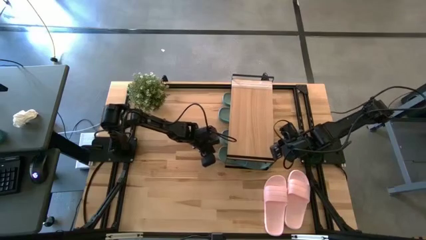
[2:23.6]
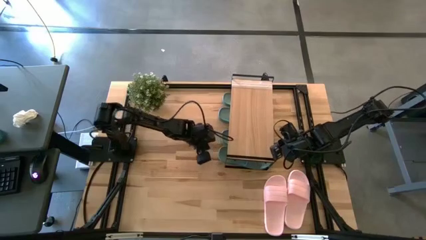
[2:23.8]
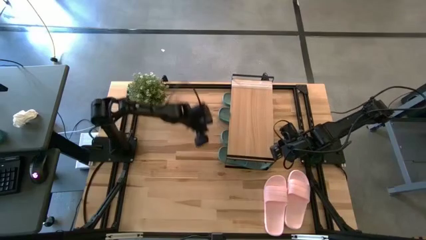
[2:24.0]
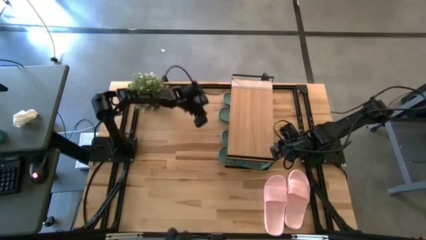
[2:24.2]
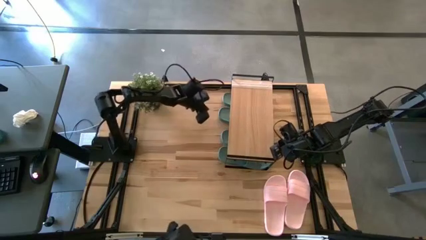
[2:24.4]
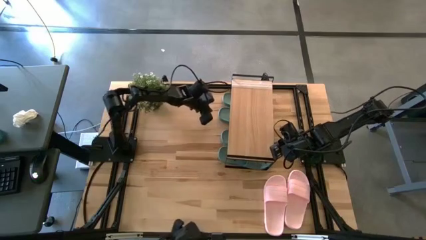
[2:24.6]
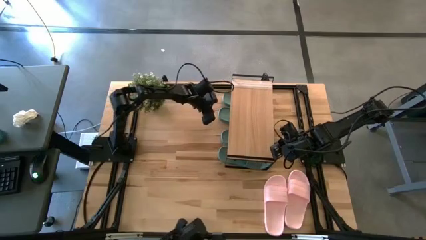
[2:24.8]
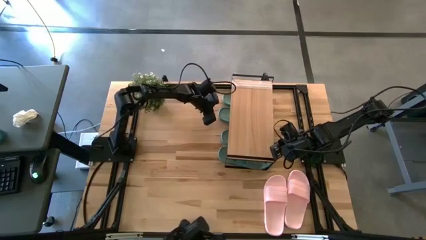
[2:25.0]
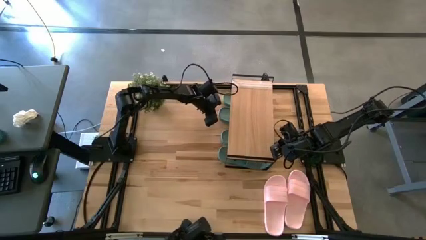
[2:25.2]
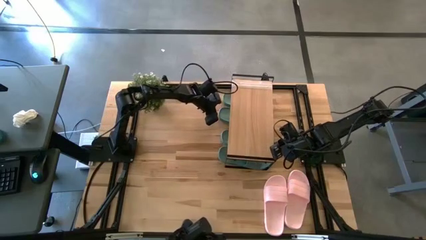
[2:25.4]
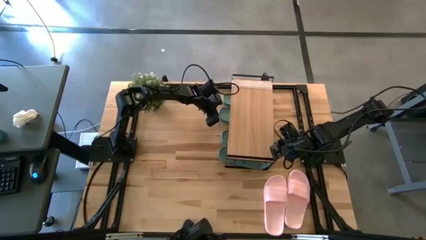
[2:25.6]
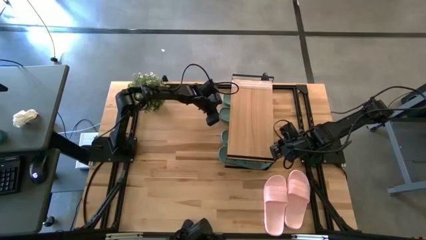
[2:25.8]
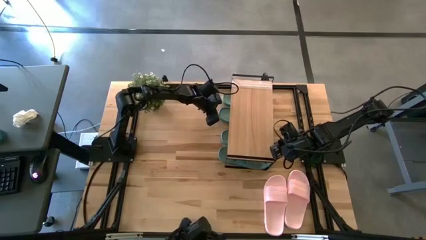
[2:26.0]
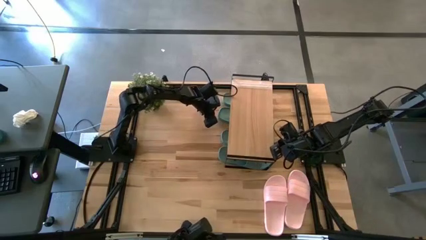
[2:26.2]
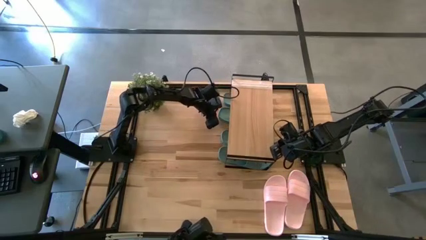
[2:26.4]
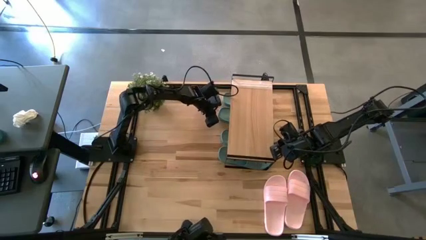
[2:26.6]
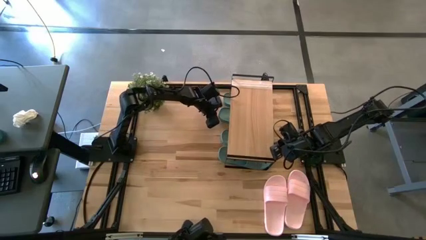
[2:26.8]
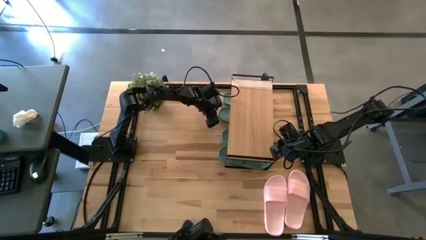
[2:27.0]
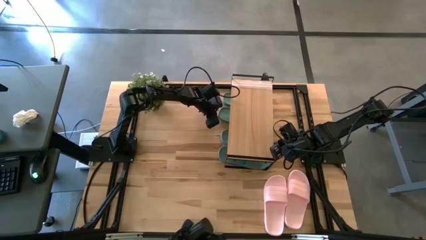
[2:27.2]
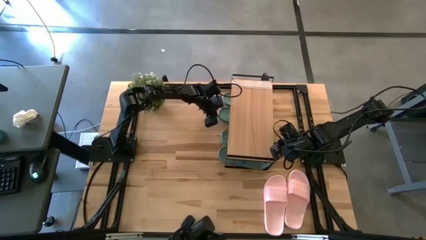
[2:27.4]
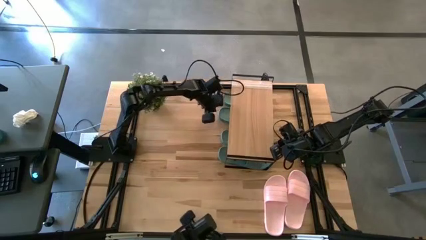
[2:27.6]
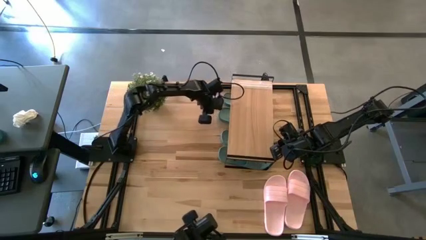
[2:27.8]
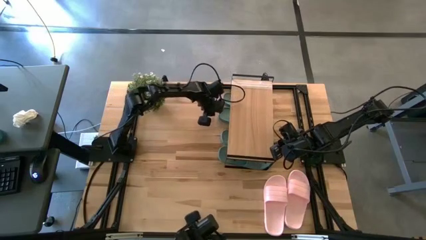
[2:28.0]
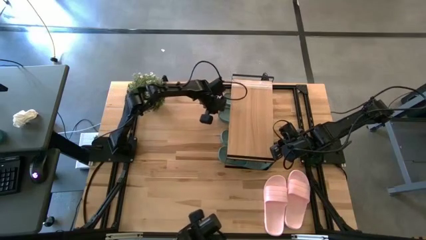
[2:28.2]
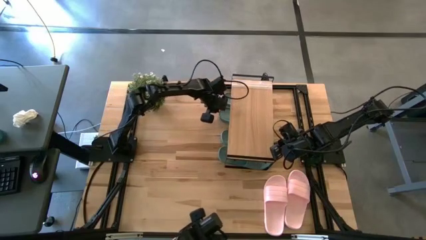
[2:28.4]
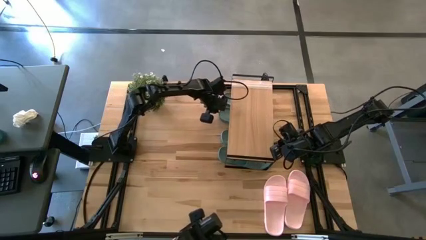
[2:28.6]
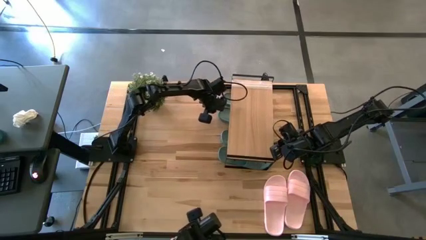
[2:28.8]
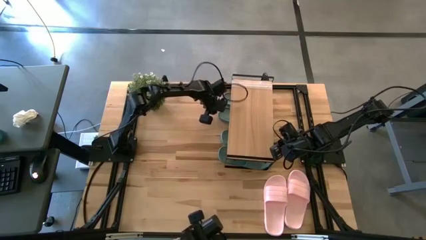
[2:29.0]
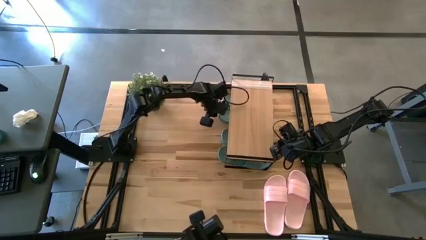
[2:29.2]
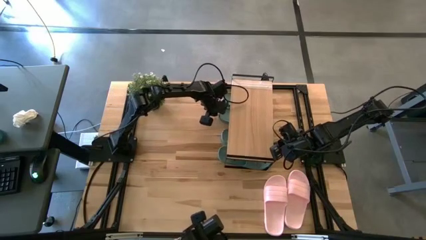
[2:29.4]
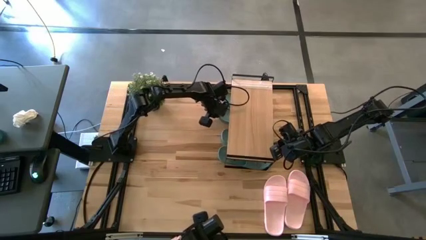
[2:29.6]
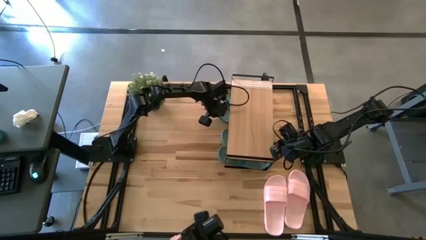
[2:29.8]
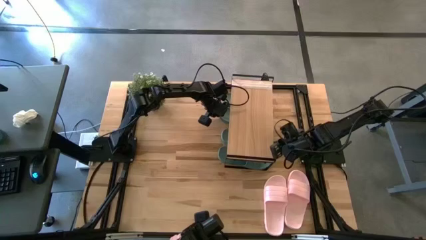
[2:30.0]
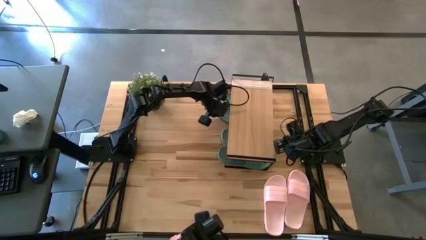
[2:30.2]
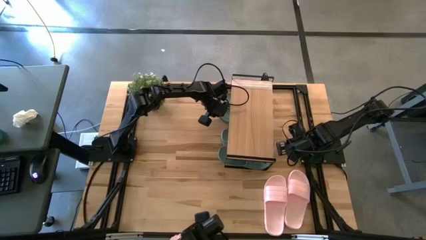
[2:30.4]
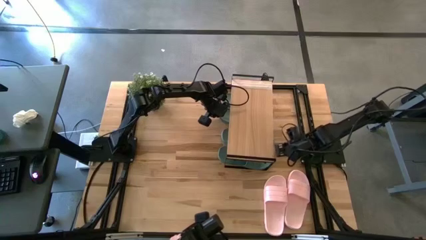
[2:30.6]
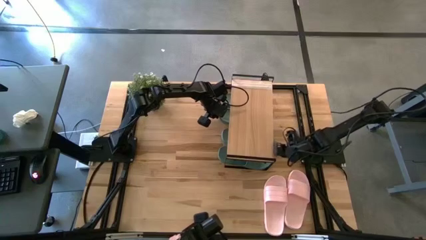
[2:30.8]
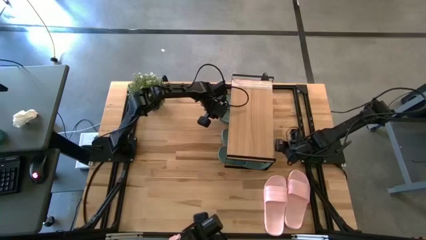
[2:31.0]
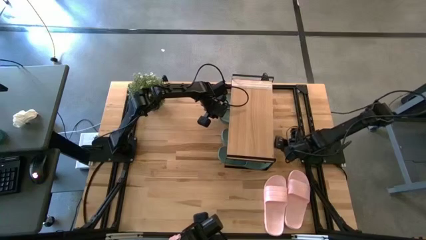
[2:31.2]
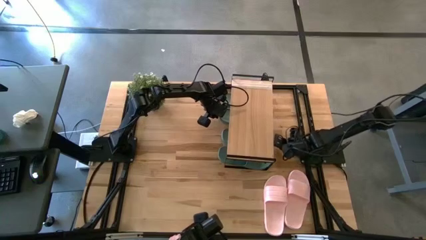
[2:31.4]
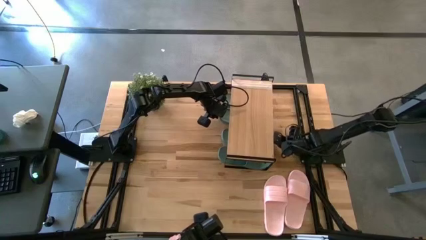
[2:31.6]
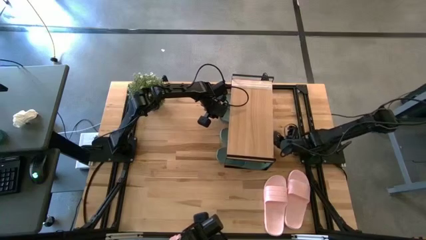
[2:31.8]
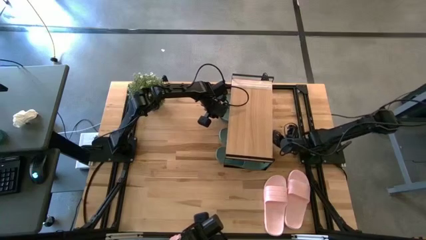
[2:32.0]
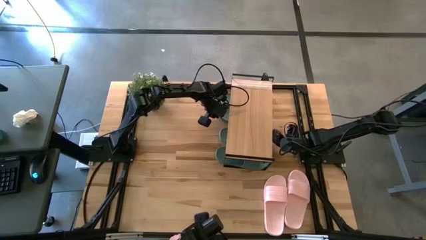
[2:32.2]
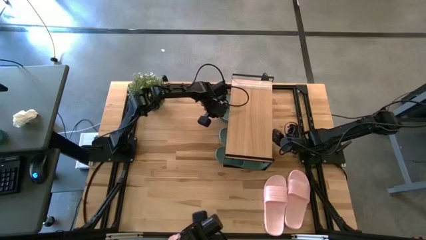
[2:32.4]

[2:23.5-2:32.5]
Task: Pick and place slides into the shelf
Adjust the green slides under the shelf

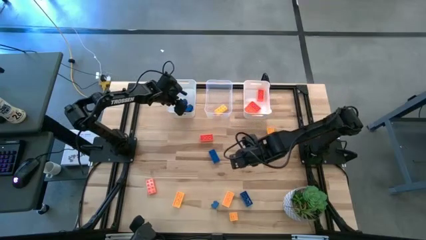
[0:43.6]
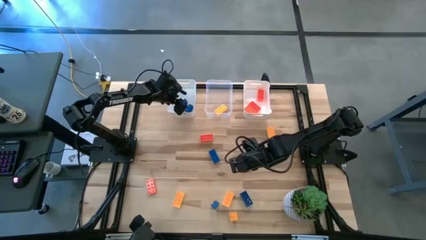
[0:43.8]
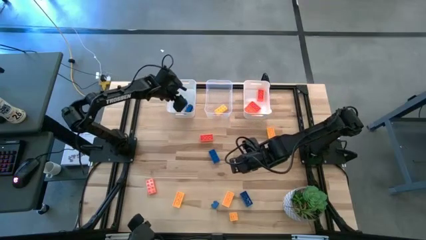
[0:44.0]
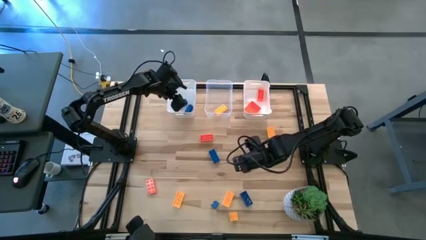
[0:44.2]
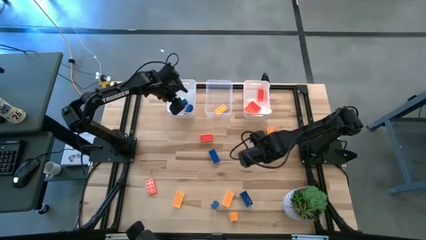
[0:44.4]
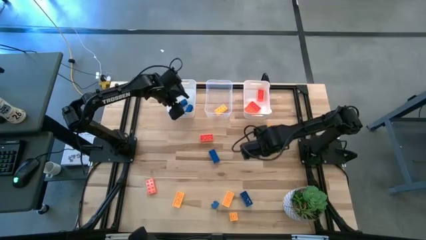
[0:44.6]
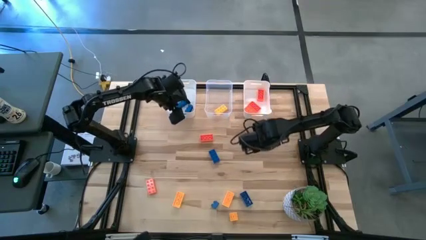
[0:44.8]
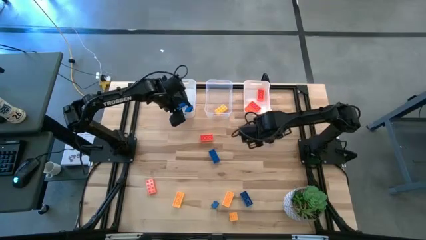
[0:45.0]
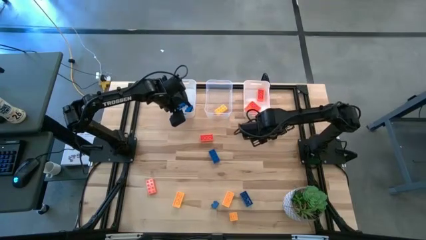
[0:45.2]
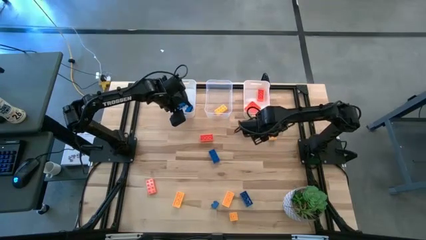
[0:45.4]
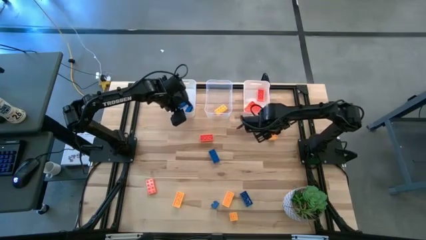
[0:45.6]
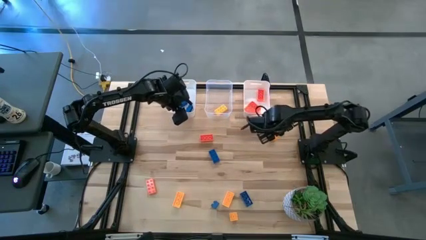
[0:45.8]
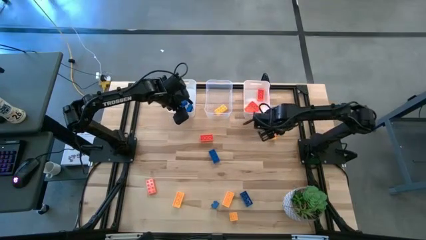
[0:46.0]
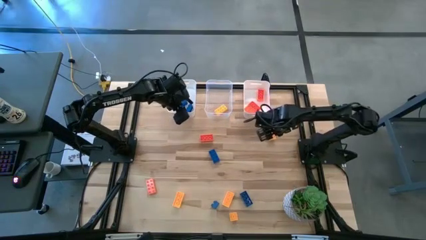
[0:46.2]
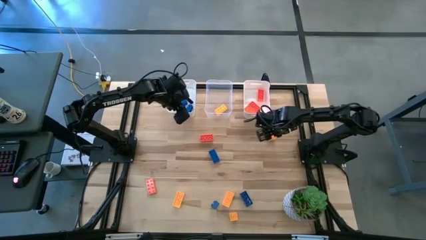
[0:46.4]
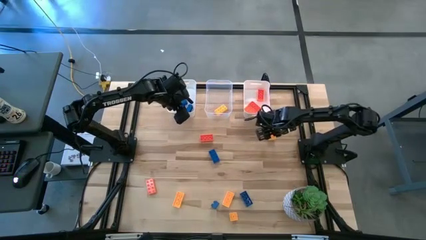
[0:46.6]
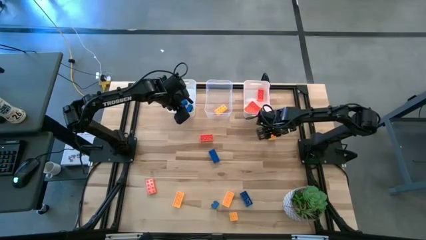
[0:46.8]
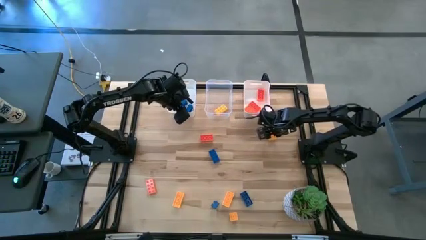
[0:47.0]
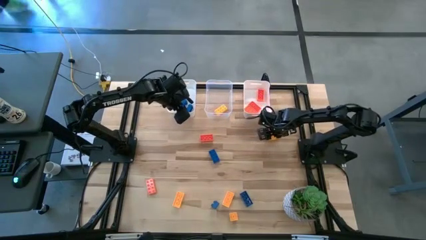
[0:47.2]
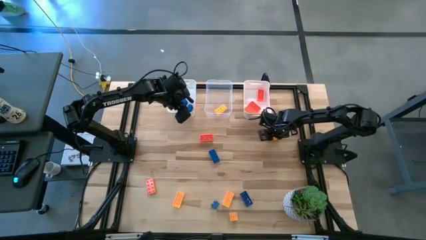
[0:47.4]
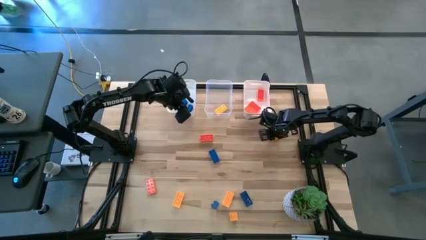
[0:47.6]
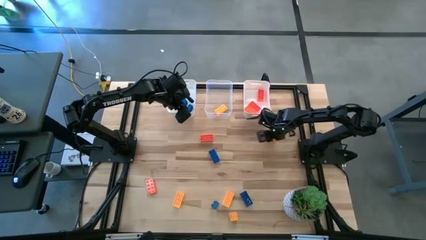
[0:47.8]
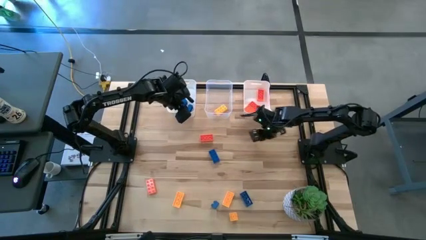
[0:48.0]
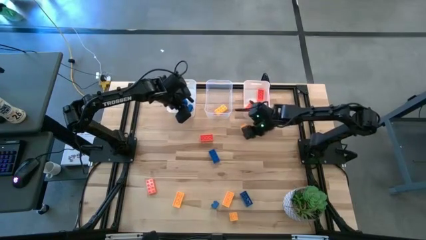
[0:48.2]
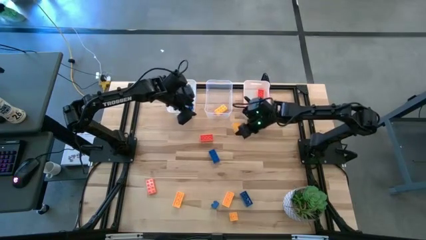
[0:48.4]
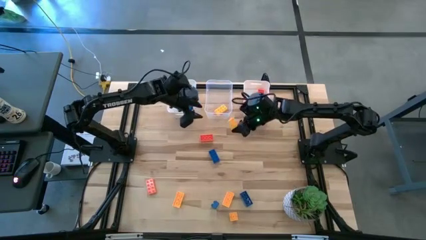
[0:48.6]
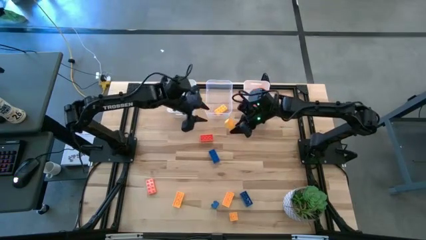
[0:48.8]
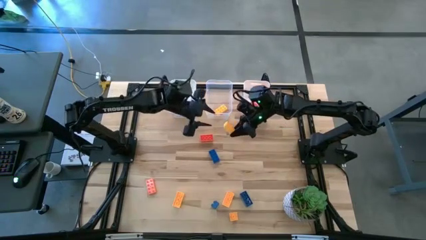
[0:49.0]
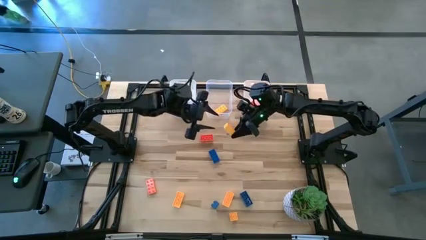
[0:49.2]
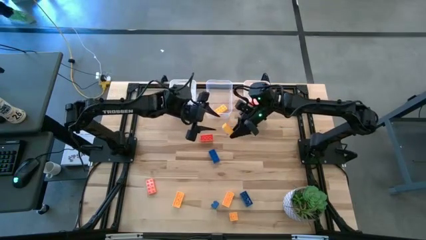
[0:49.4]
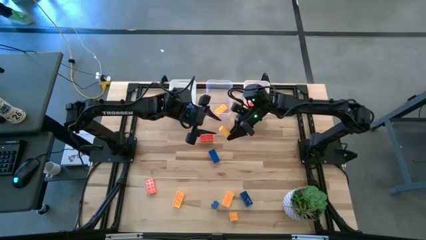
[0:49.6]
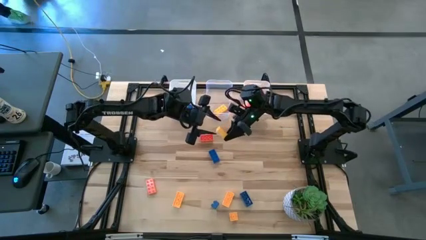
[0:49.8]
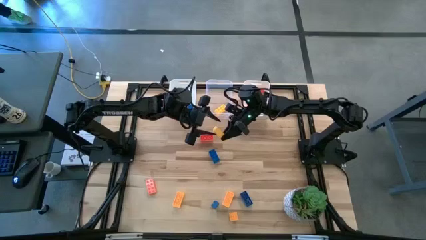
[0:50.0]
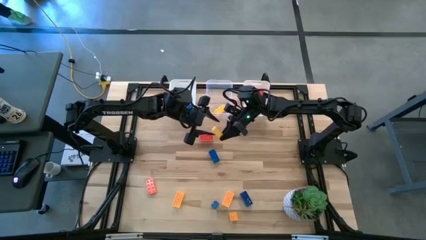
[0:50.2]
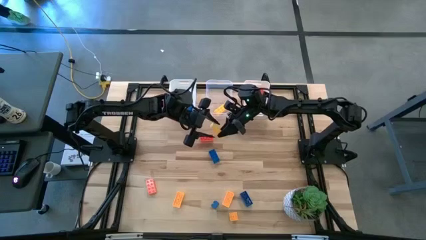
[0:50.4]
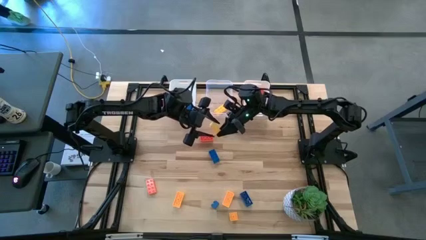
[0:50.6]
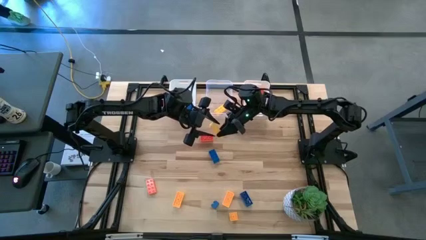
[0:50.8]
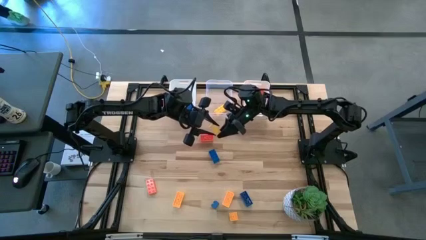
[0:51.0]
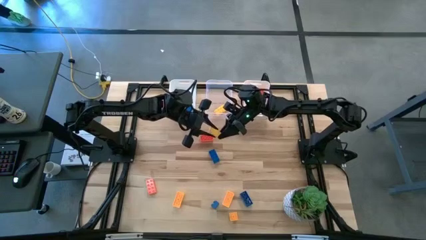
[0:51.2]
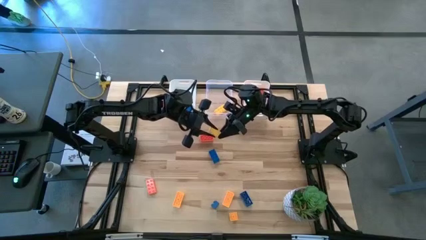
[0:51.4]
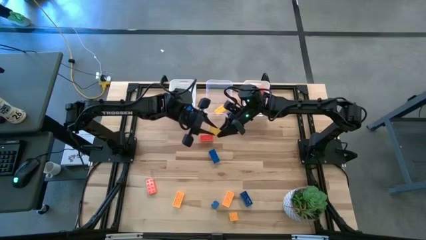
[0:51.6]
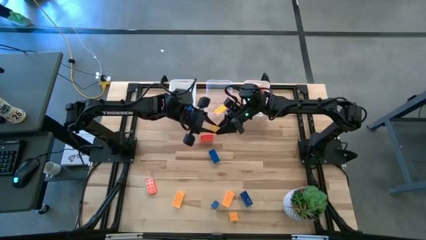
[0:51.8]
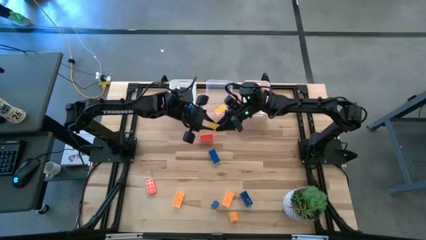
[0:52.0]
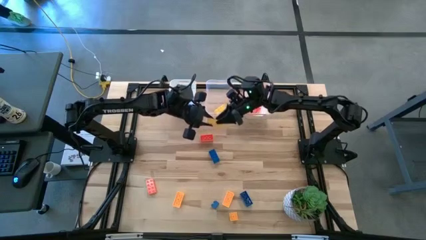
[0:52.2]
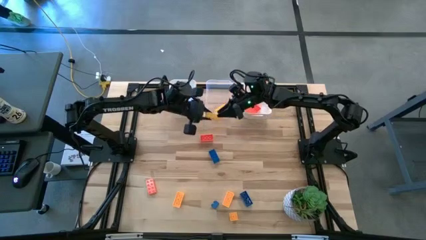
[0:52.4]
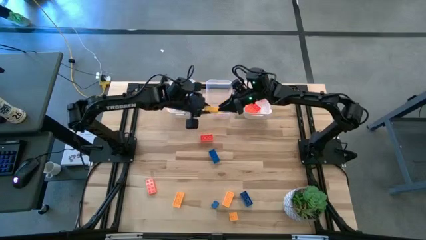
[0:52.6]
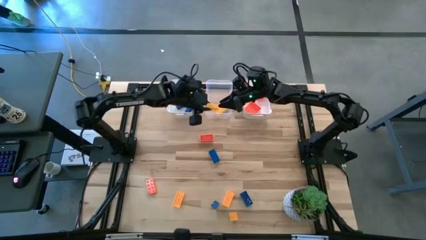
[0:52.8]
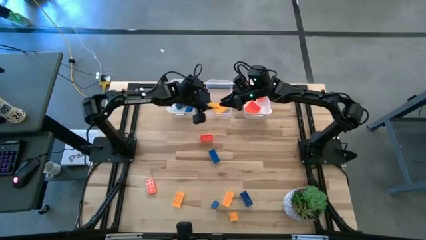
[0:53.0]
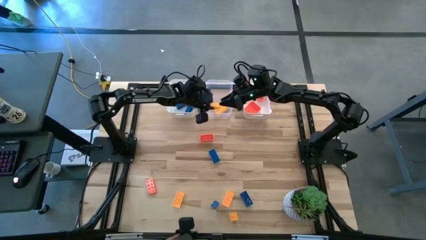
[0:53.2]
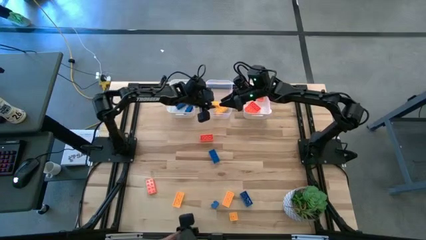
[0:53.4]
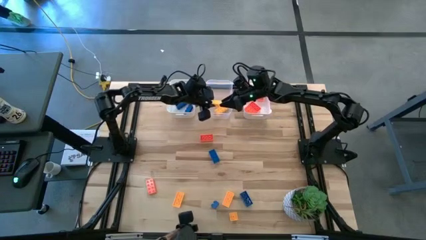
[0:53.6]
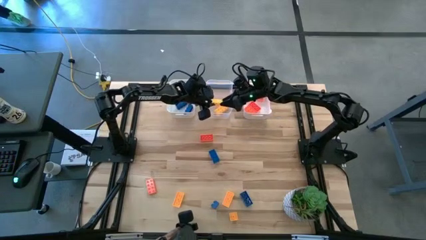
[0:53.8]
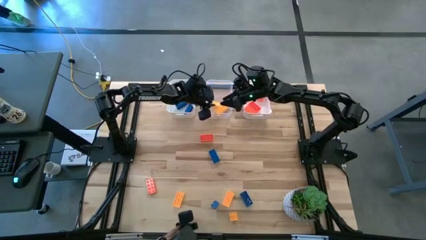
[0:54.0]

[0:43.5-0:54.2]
Task: Sort & place blocks by color
Put the yellow game piece into the transparent bin
